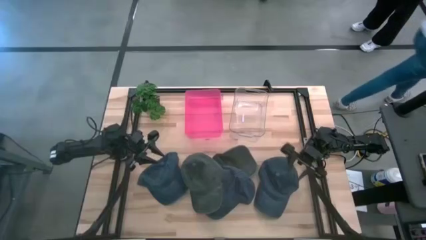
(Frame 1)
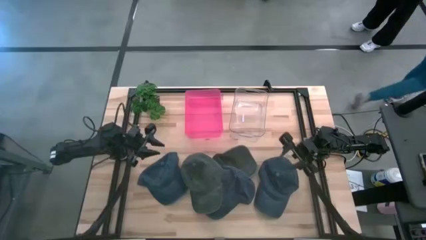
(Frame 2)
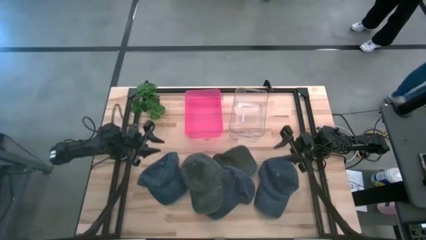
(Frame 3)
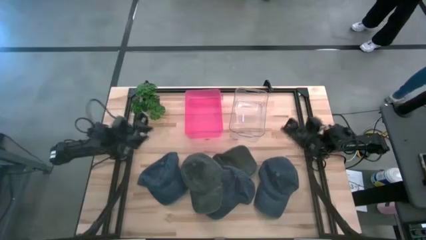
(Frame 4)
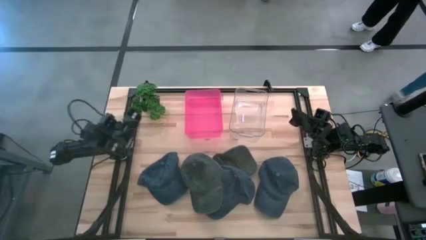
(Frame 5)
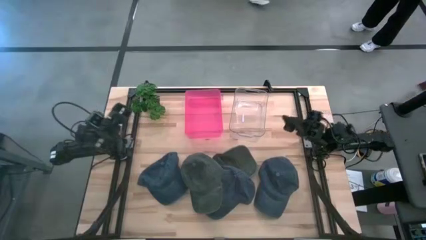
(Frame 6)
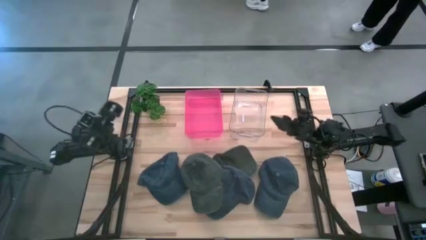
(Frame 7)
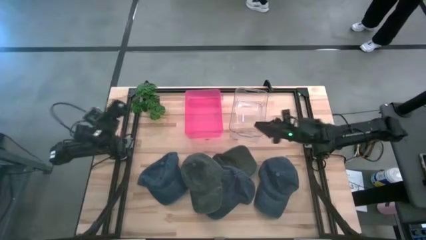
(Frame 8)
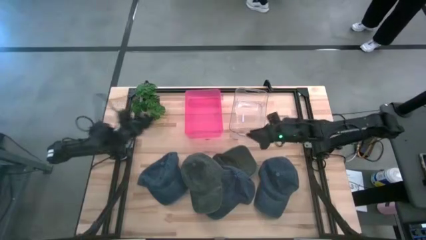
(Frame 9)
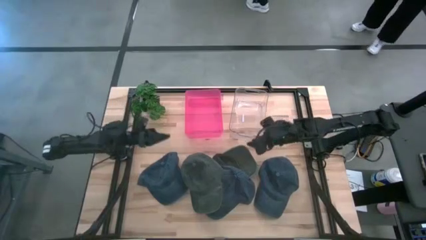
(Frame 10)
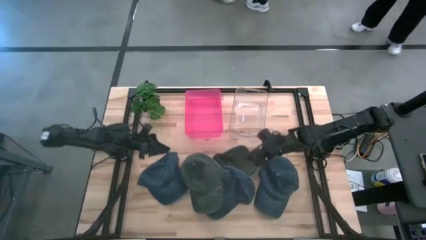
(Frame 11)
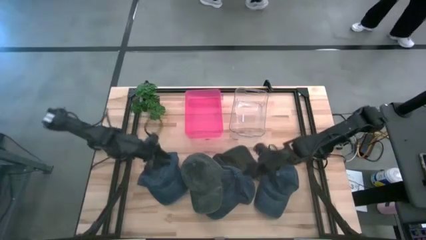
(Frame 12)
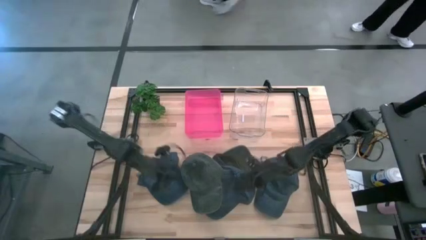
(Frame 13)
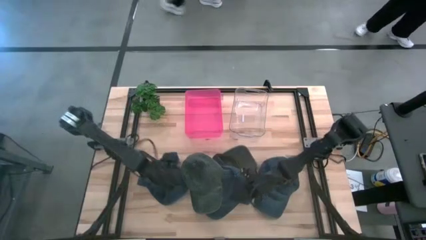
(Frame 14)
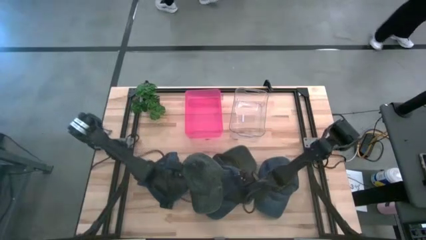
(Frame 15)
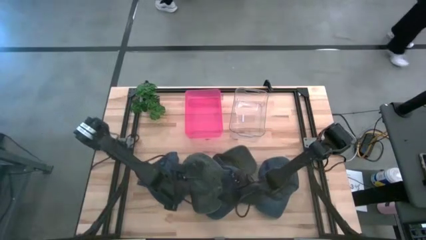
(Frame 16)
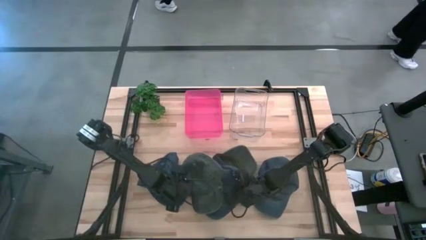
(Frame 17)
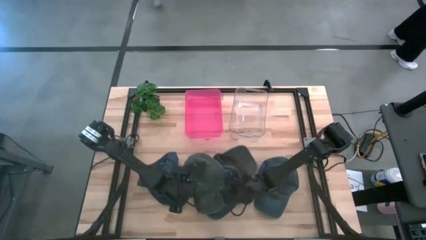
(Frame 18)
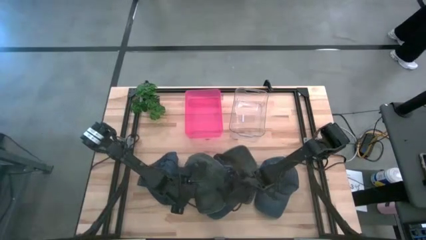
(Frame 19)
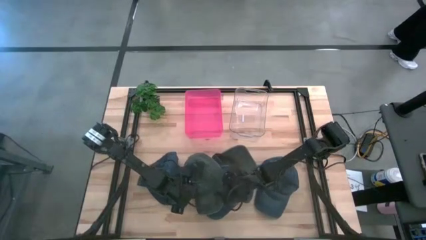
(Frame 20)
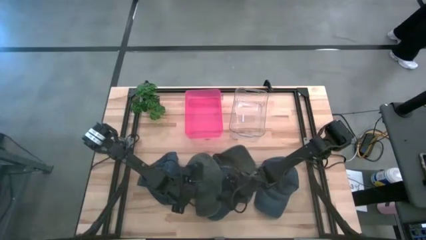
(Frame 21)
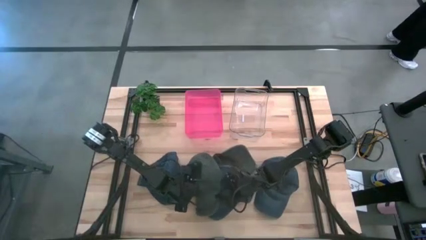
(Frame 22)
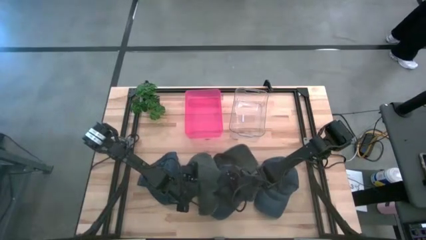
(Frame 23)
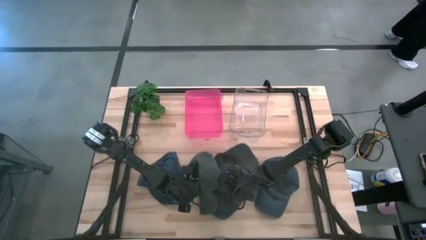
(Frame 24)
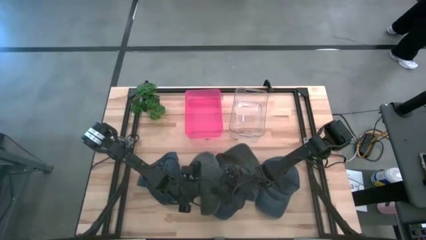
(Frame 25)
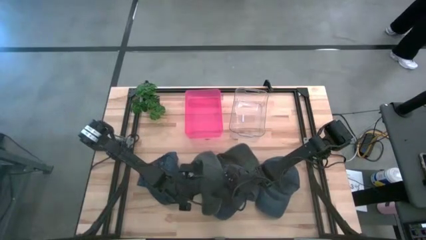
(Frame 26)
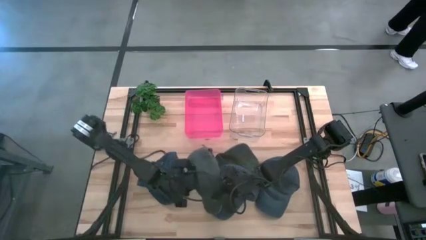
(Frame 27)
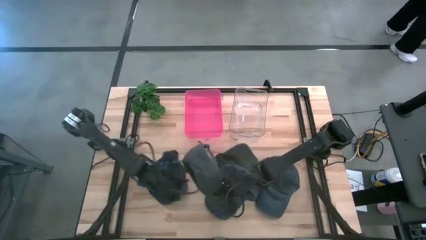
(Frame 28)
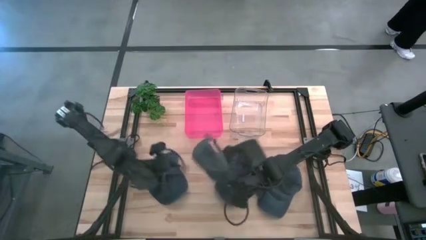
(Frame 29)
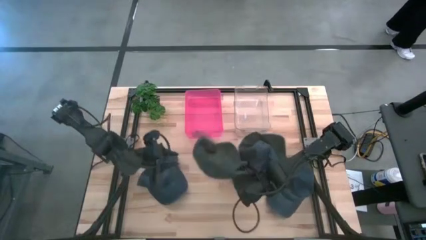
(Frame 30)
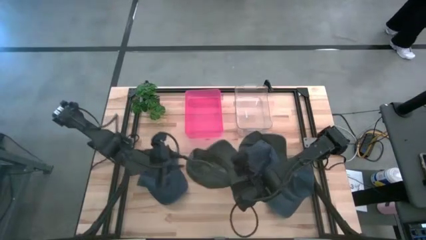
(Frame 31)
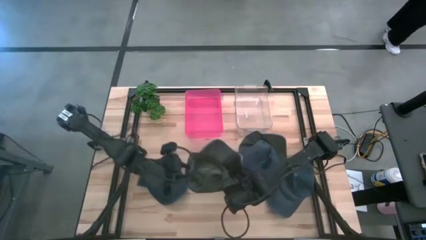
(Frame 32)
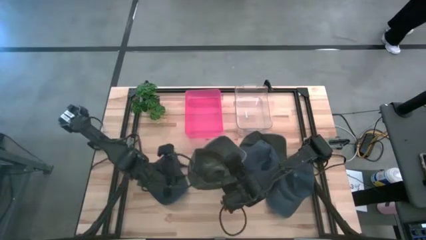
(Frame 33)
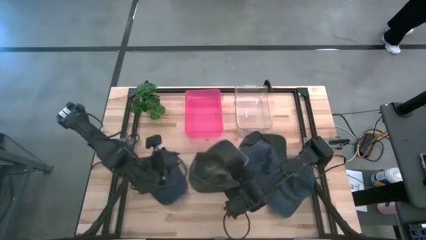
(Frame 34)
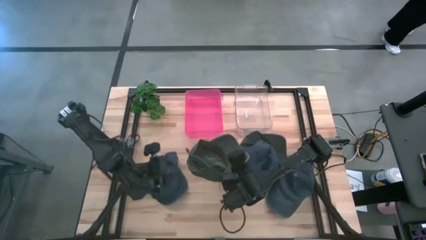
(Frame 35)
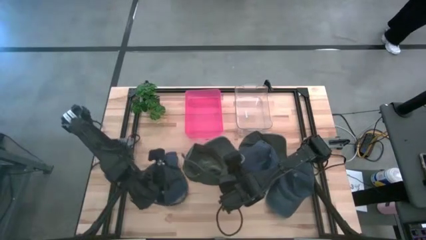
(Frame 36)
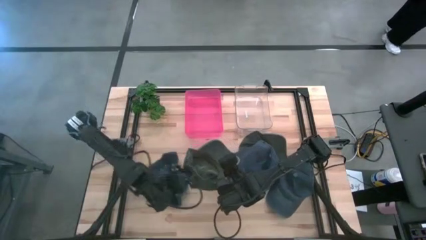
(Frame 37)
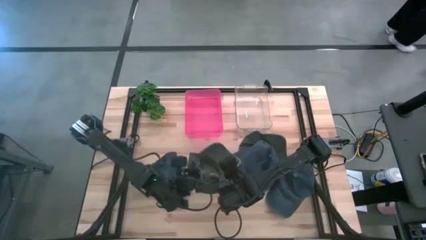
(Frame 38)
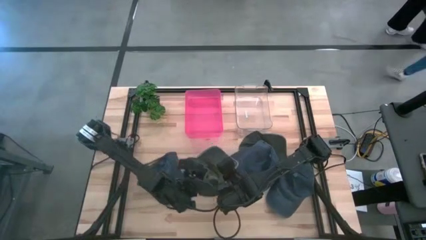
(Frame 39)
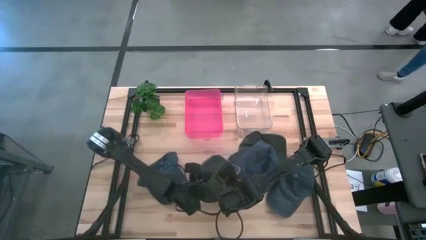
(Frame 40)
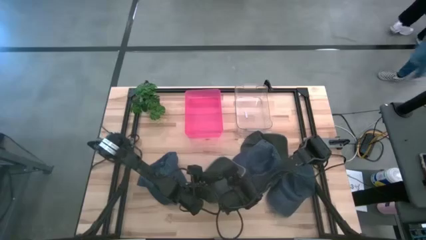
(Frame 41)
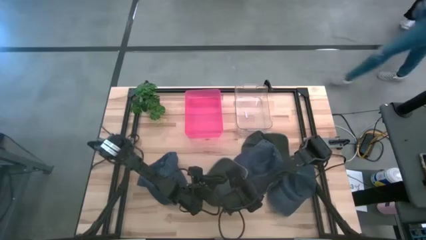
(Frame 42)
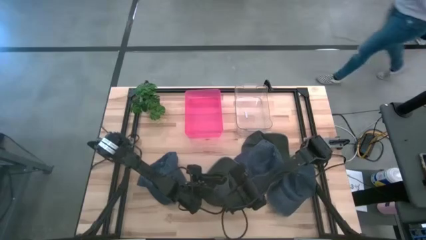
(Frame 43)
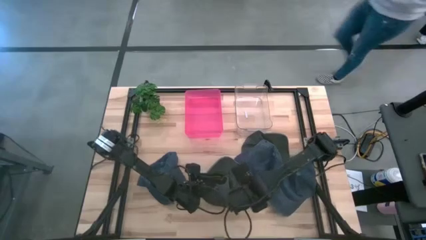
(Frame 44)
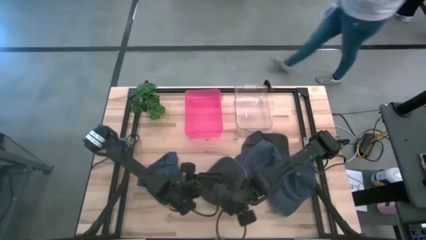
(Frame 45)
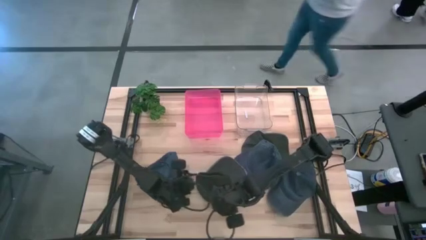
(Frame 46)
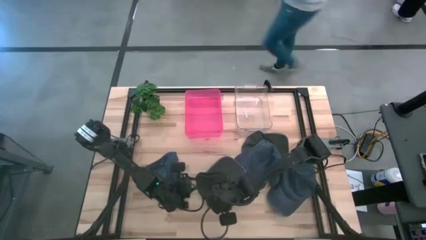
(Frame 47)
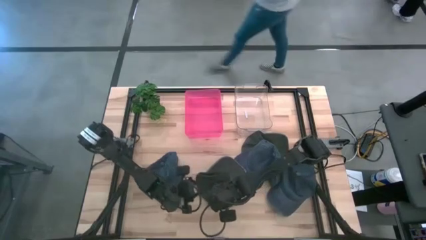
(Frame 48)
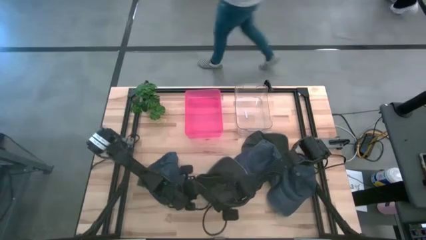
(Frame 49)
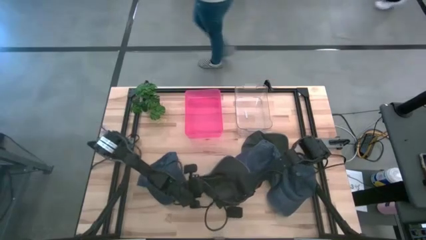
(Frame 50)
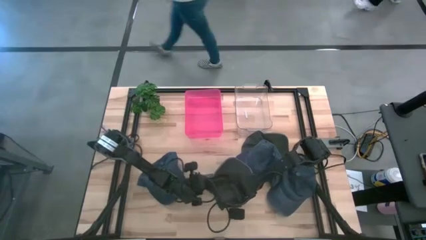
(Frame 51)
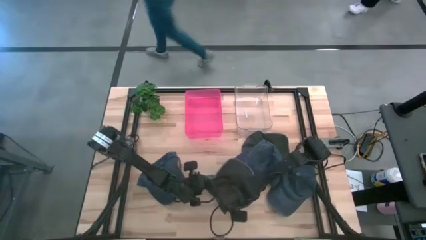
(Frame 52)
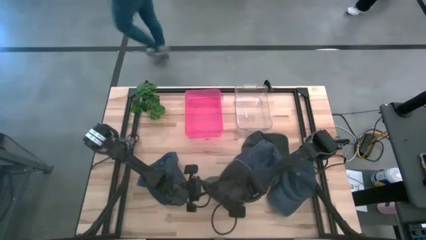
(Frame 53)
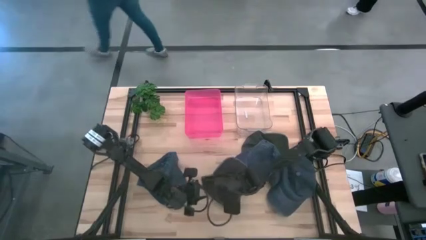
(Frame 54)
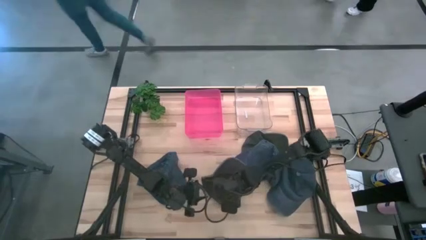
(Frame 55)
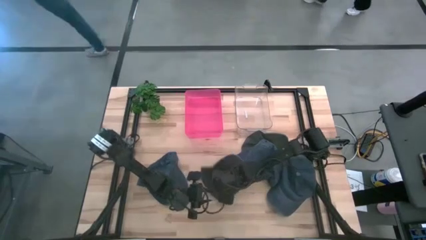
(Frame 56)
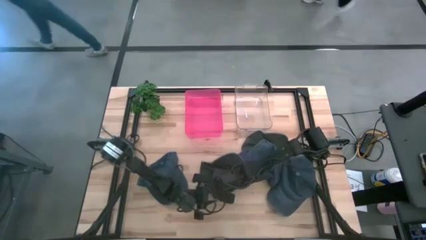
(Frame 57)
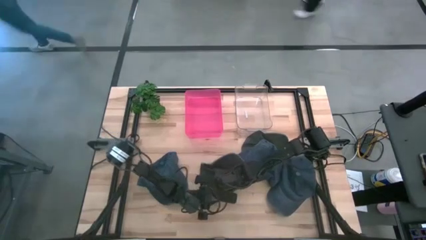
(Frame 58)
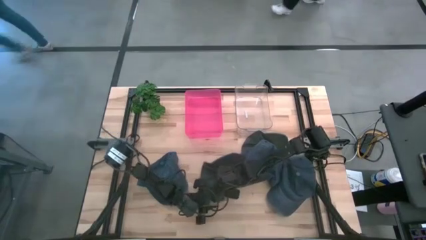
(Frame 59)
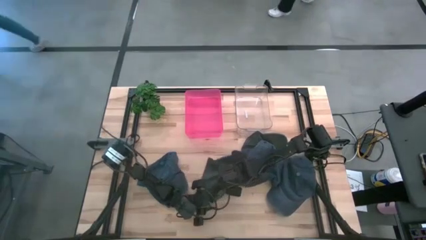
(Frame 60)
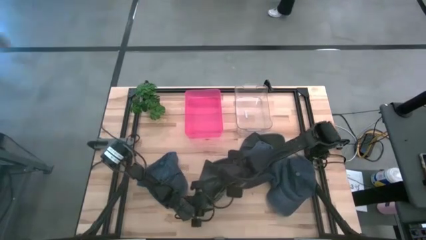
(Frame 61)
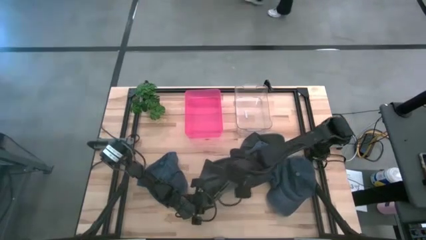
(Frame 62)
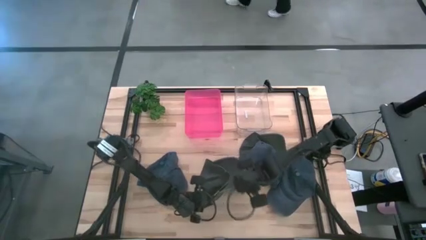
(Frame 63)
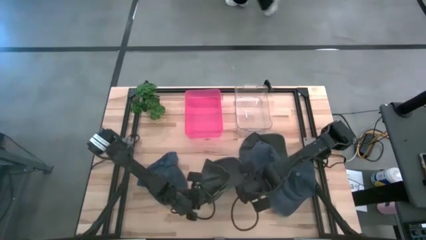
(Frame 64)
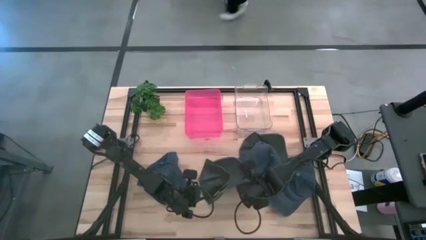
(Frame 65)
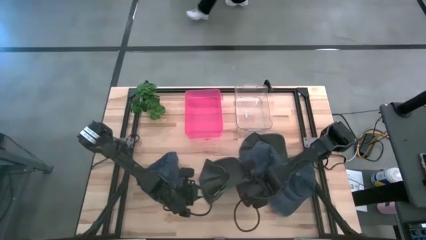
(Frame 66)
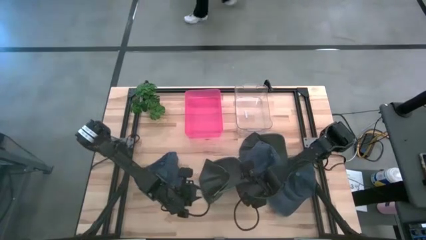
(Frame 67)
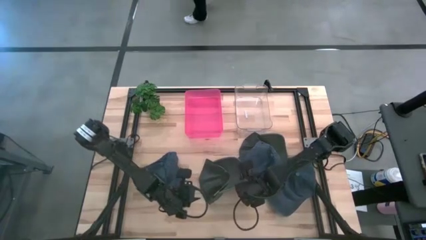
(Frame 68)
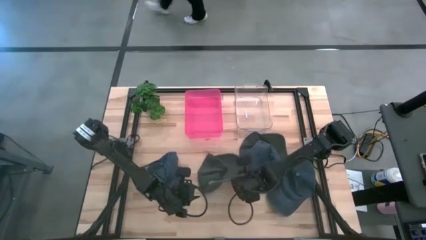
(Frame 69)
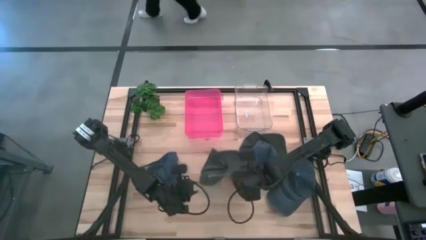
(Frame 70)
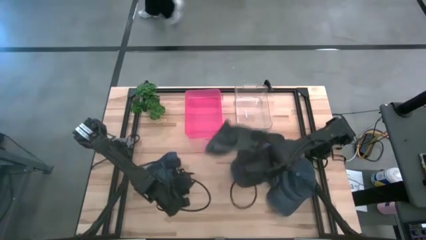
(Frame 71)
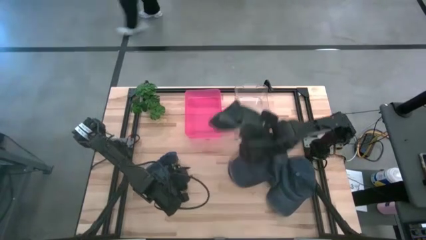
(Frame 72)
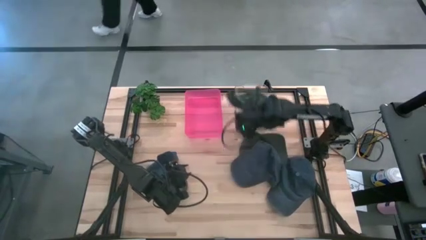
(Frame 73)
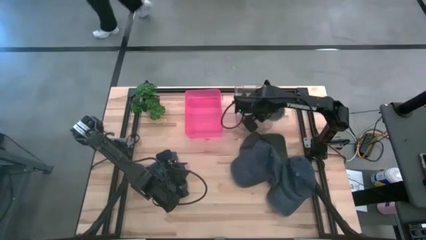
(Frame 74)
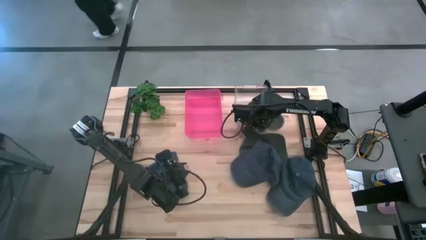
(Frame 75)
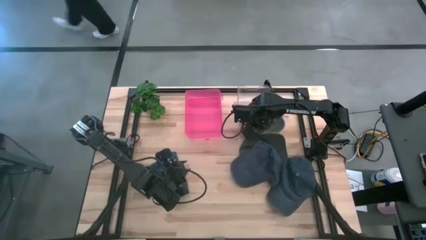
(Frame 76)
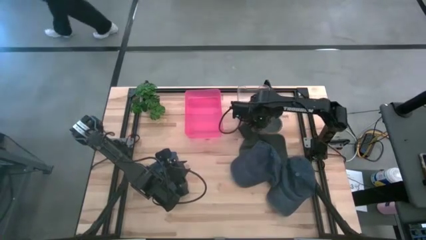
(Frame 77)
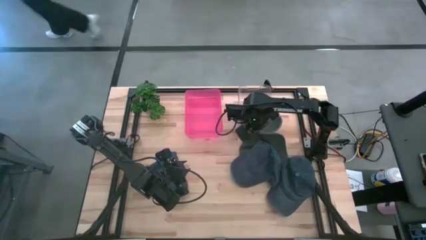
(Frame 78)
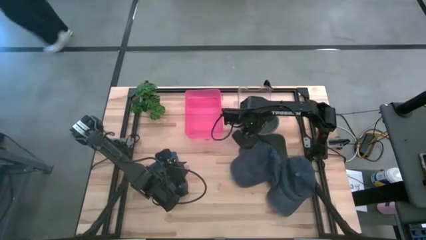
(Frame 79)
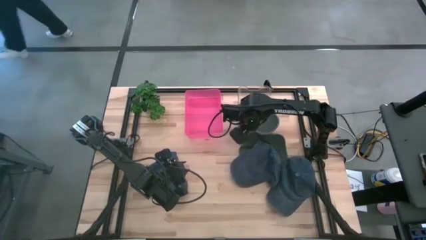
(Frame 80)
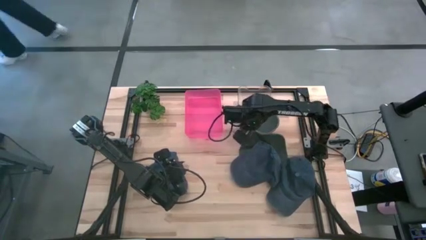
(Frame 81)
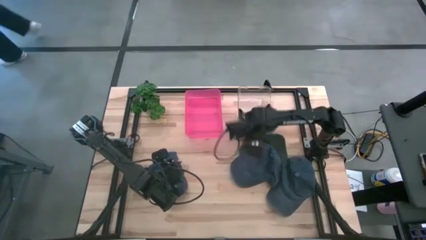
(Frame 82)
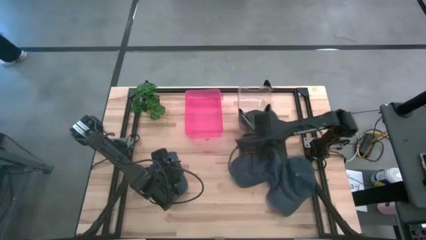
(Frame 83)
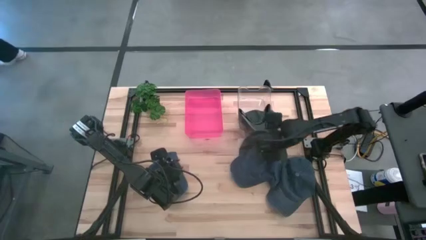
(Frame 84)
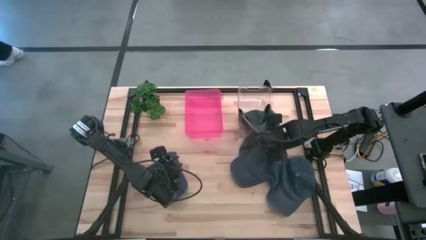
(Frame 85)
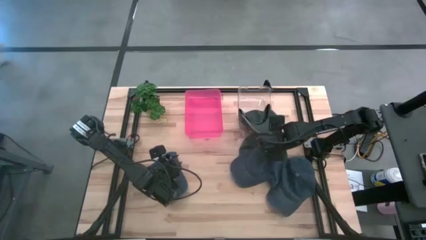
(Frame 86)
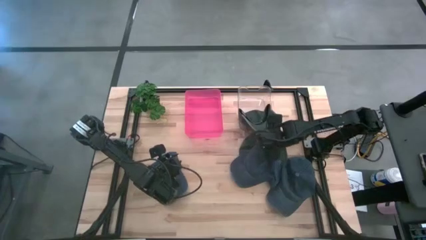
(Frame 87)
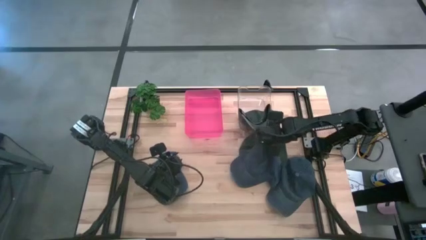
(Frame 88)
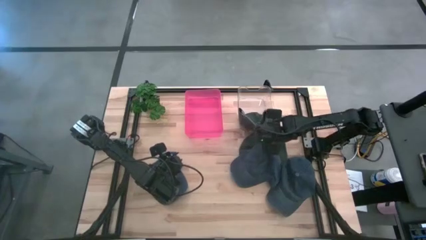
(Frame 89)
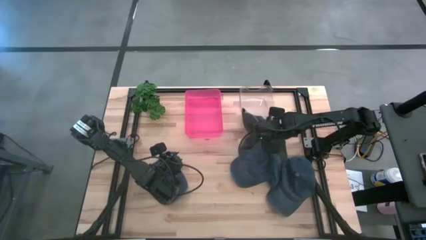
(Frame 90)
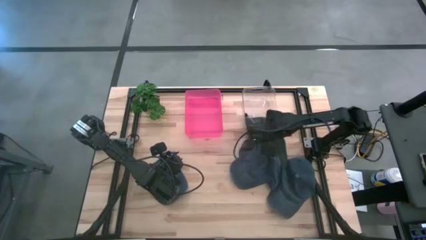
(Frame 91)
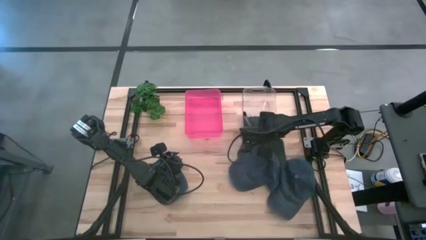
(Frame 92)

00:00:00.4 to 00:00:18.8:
Task: Pick & Place hat
Put the left black cap into the transparent bin
